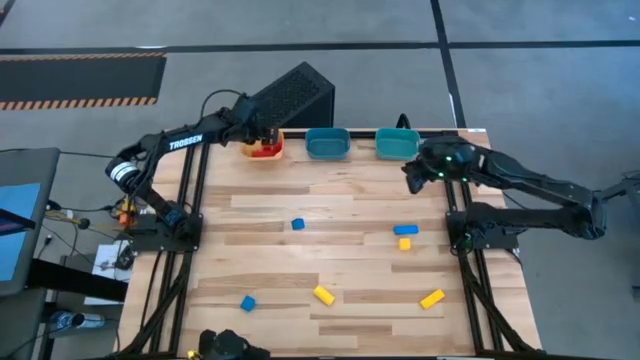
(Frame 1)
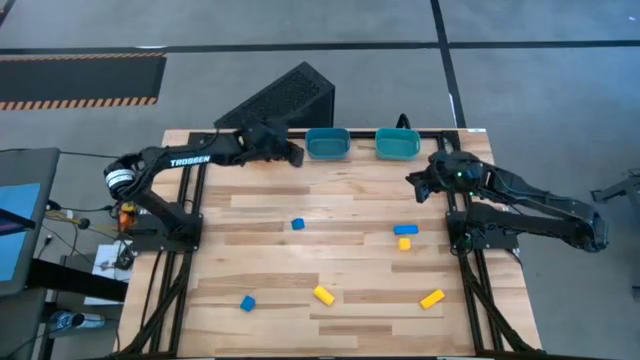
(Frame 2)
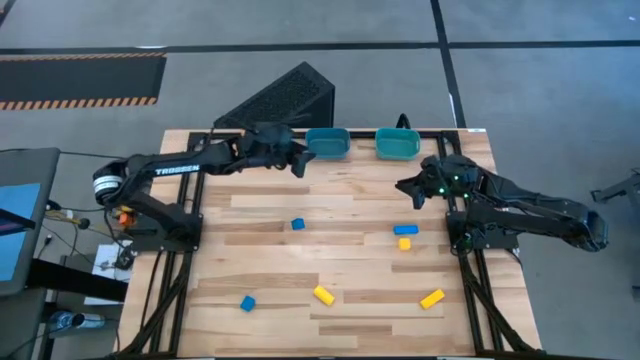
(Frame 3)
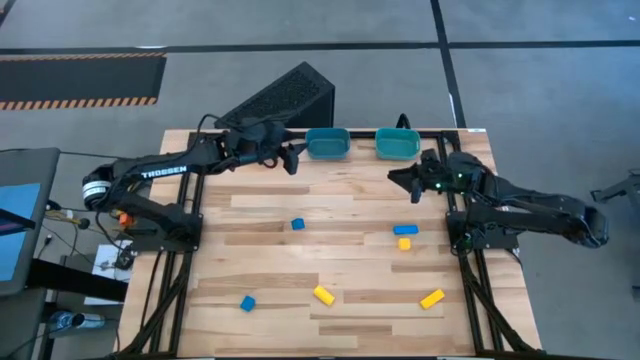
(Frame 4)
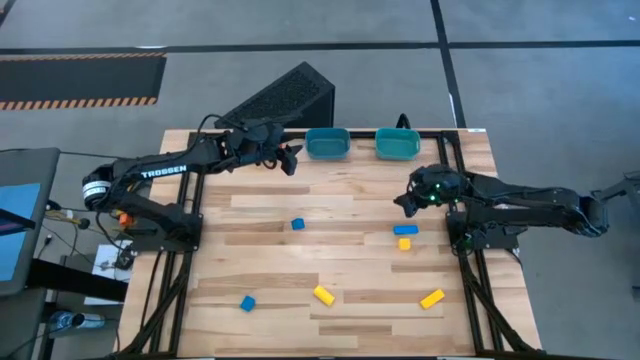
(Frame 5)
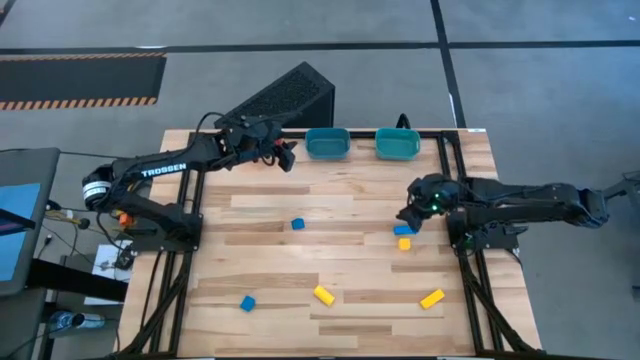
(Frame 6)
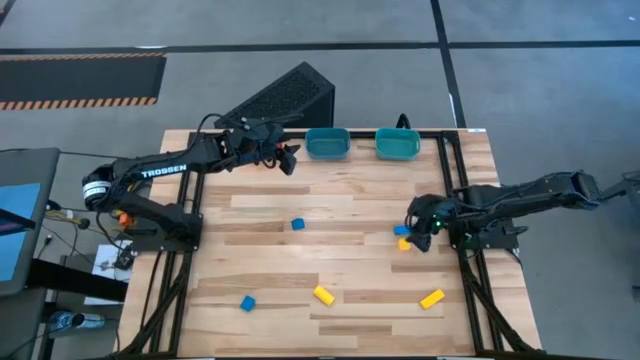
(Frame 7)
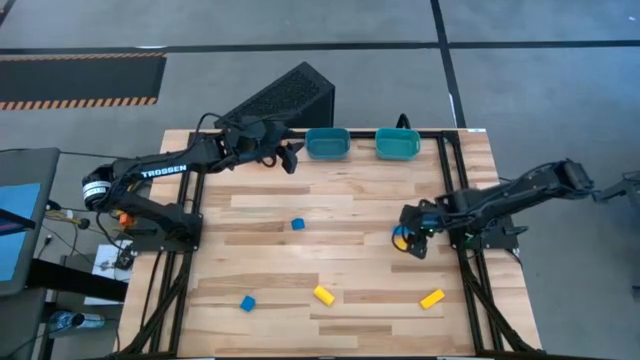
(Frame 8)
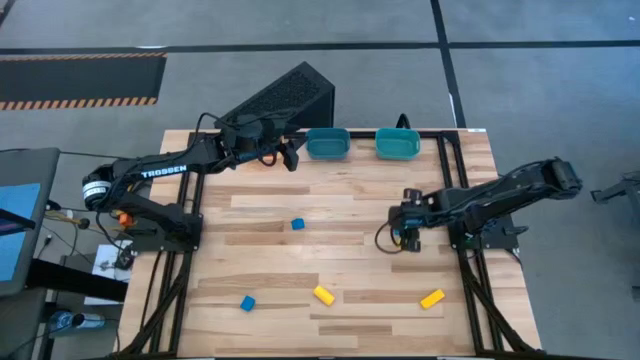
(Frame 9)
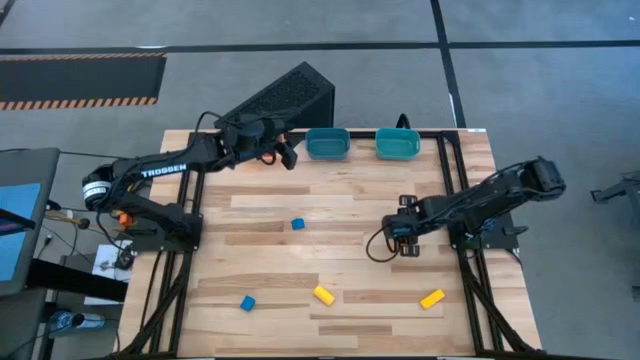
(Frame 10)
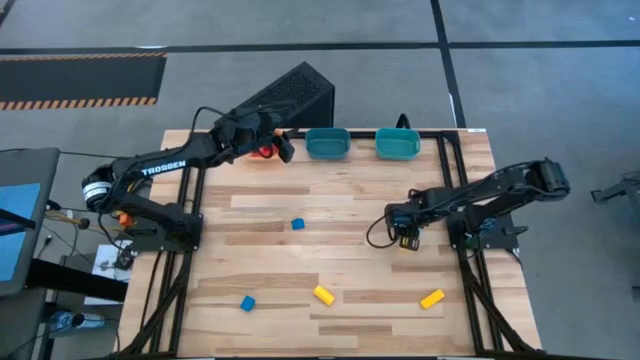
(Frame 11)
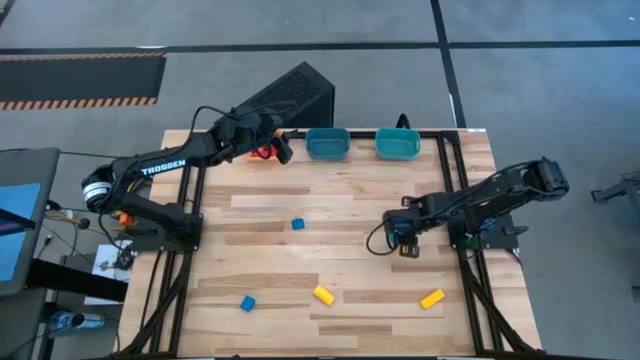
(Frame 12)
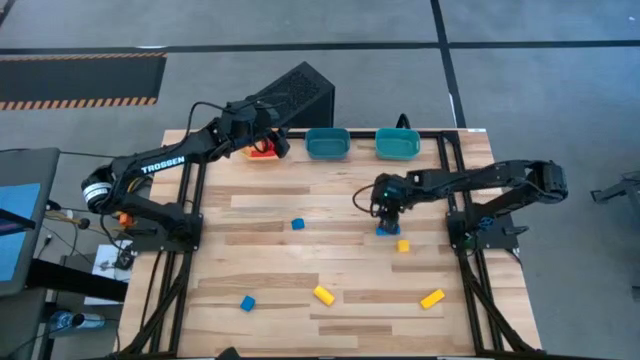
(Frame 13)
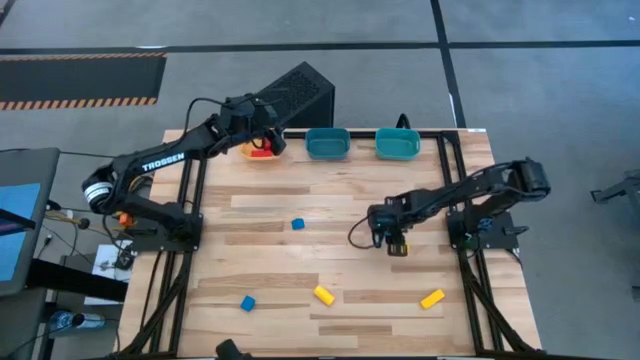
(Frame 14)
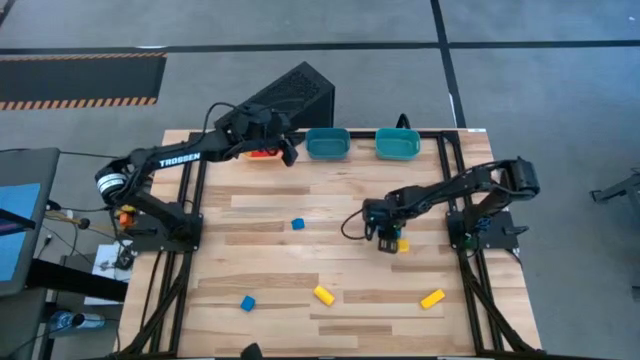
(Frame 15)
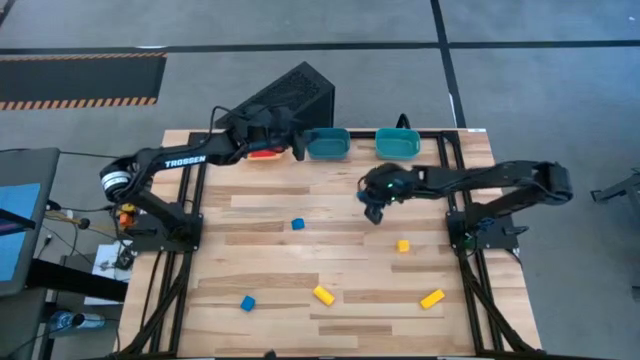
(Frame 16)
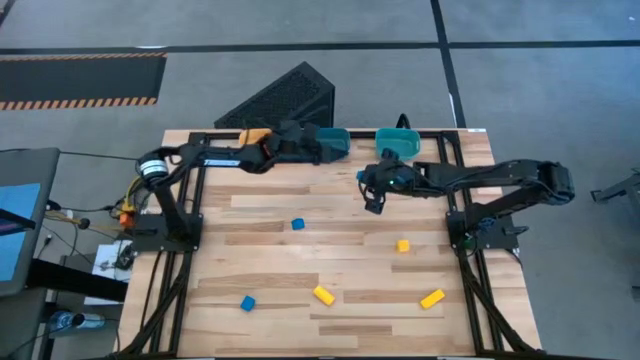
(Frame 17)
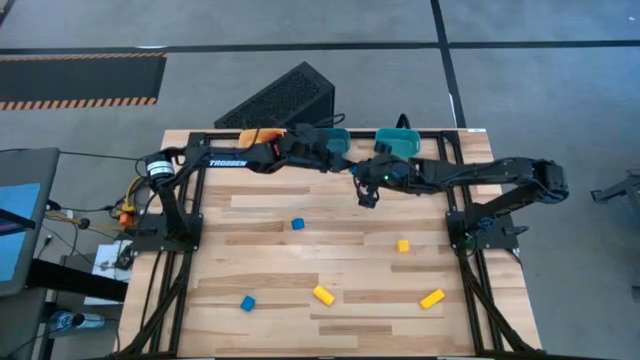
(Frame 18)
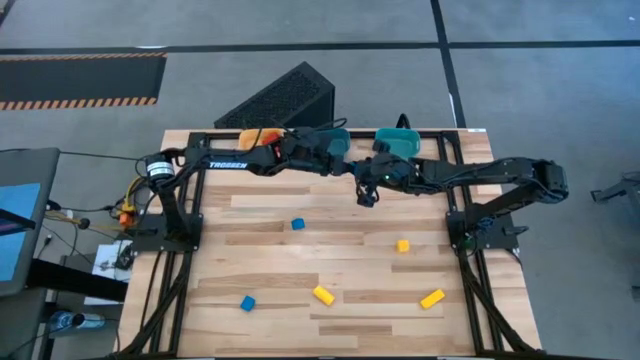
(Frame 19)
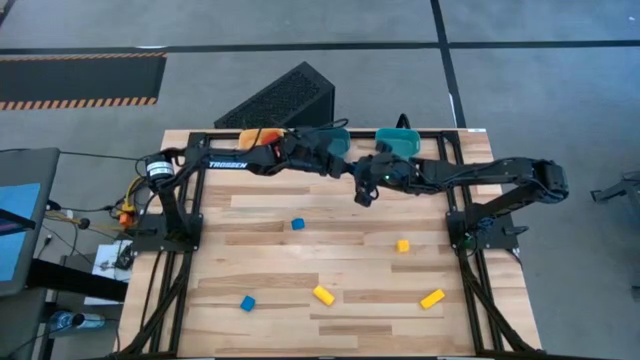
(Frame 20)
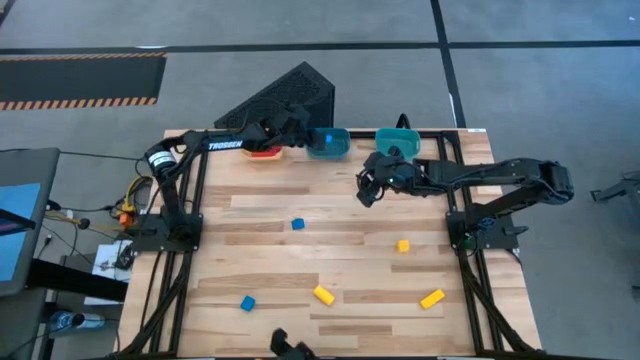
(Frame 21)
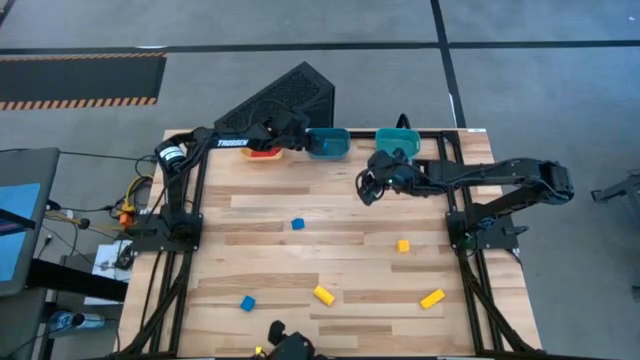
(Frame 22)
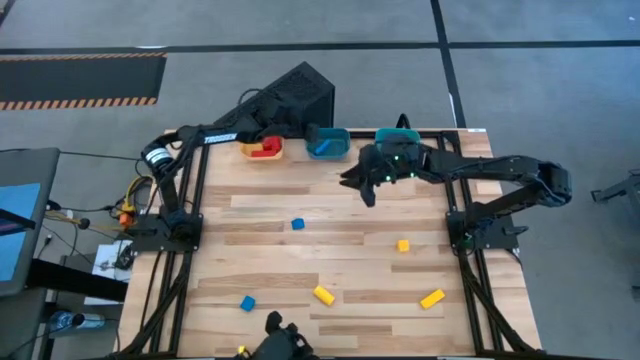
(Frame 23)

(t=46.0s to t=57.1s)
Task: Sort & place blocks by color
Put the top right blue block into the blue container

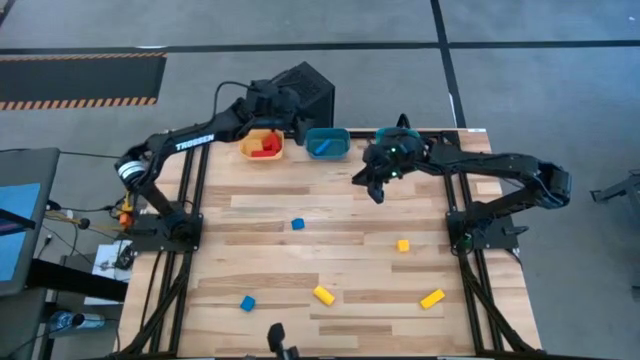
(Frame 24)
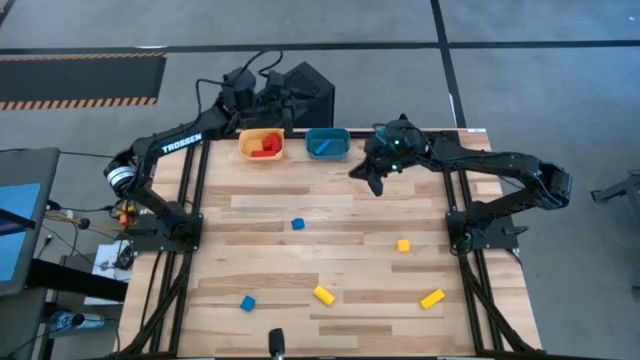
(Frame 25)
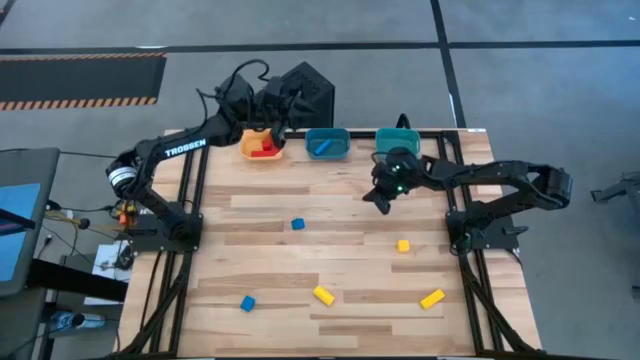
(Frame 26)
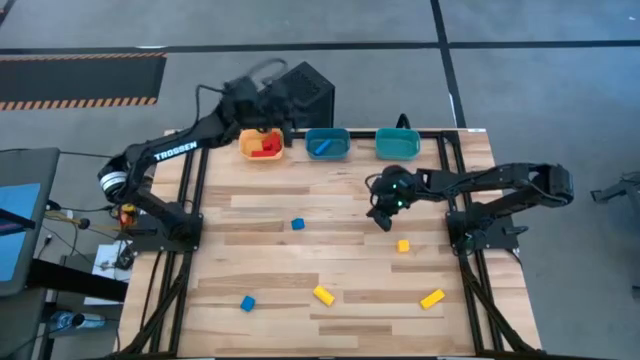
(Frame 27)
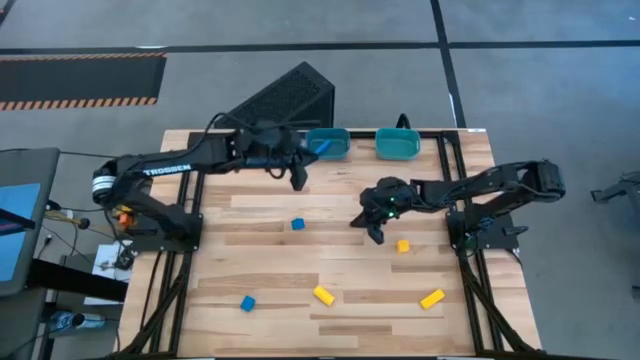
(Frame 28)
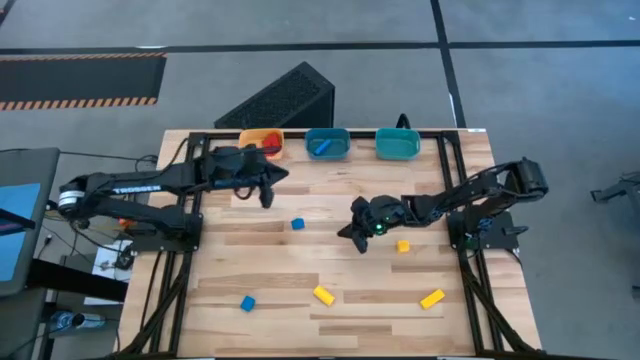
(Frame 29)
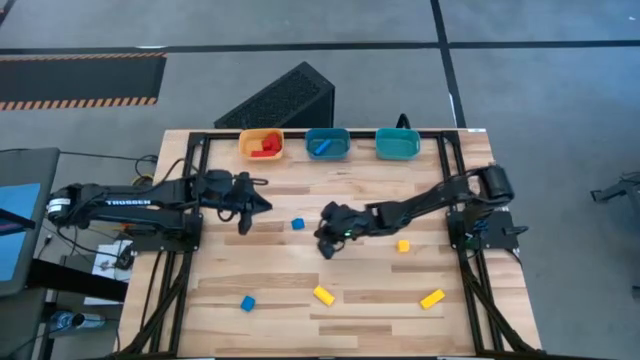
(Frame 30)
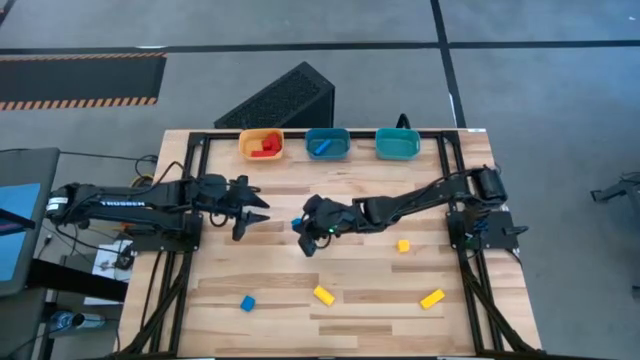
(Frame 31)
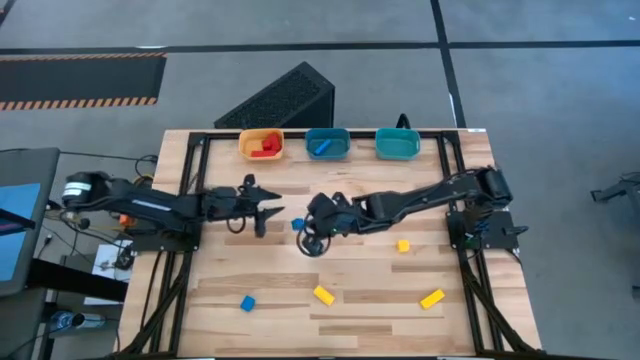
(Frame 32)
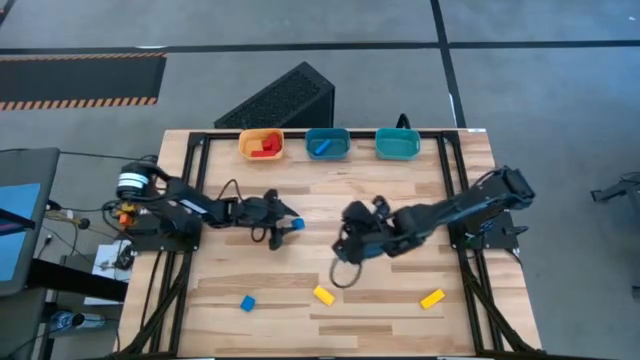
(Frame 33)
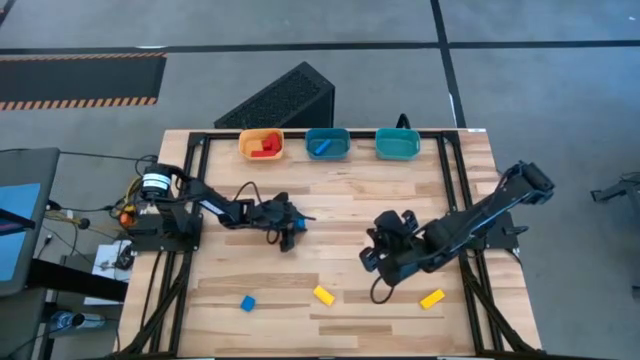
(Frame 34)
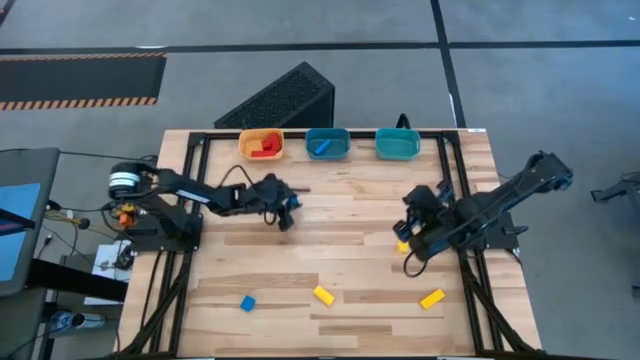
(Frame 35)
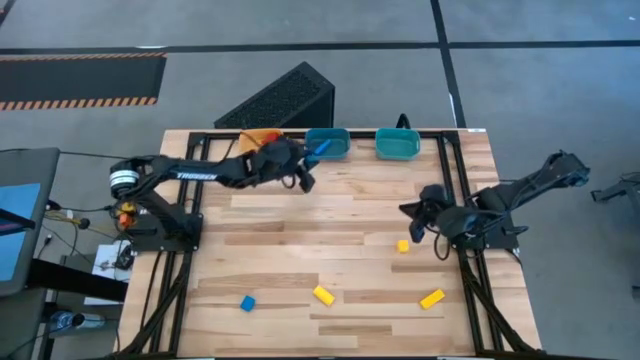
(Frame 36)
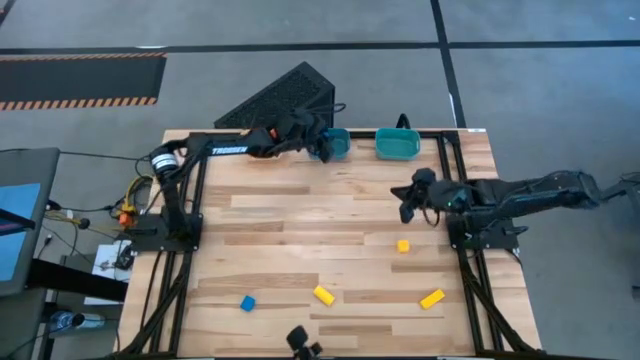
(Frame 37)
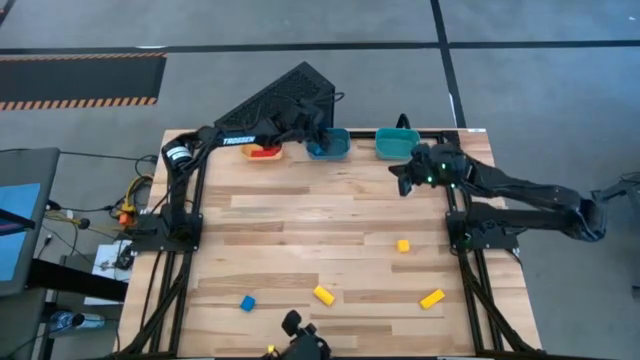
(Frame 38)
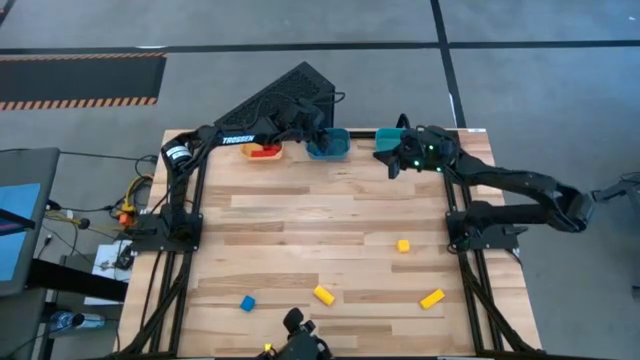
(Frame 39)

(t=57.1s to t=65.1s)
Put the top blue block into the blue container

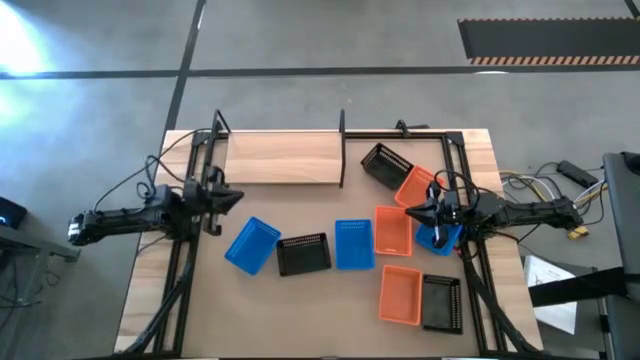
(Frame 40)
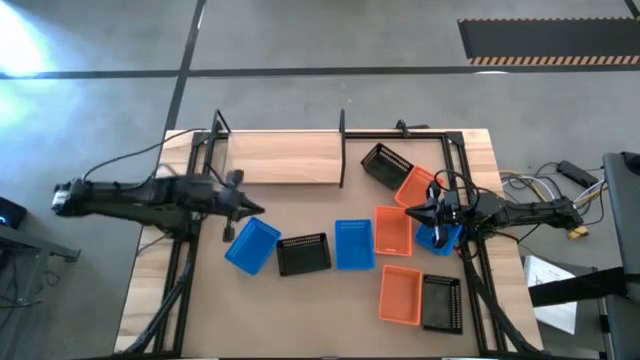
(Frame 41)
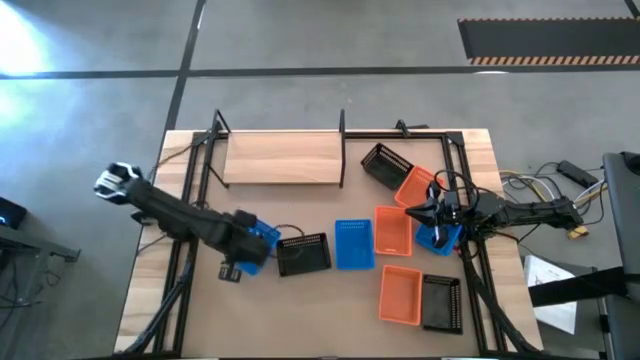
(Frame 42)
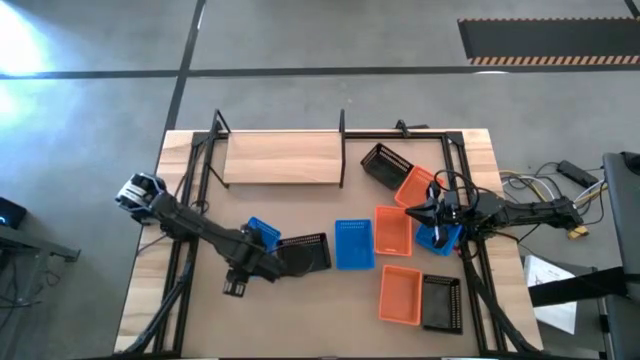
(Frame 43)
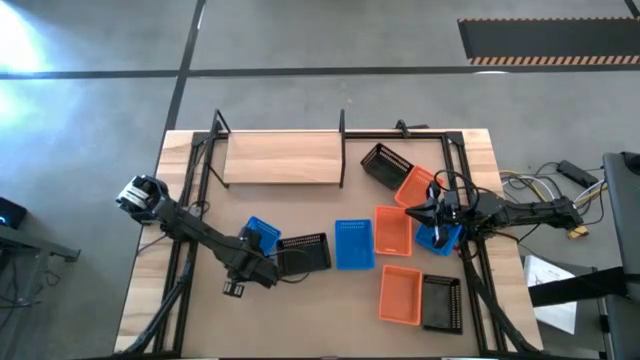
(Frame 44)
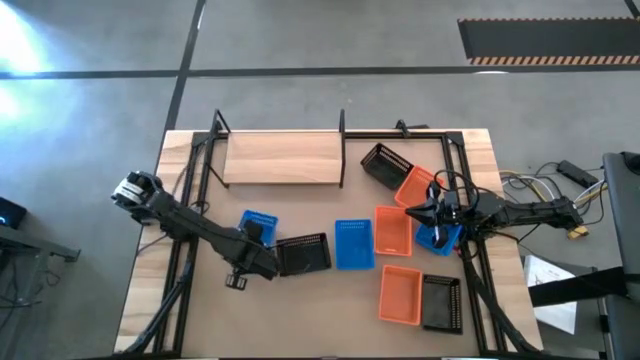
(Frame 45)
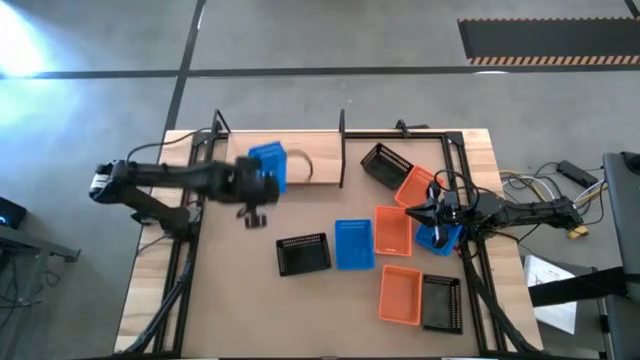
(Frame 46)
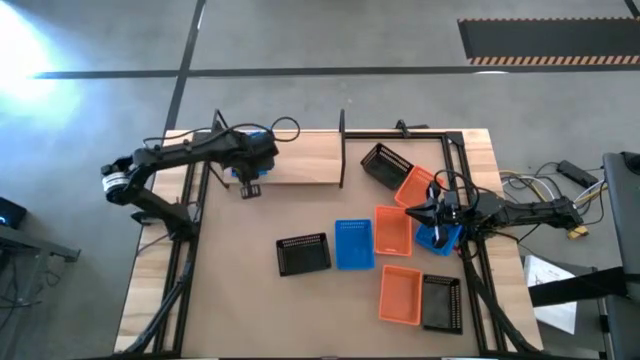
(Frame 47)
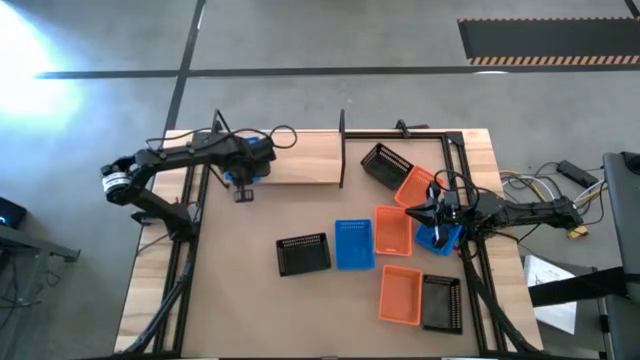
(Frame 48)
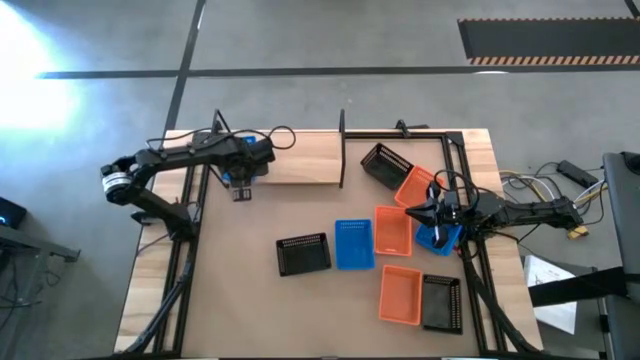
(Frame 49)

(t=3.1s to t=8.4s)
Task: Stack baskets on shelf by color
Put the left blue basket on the shelf
